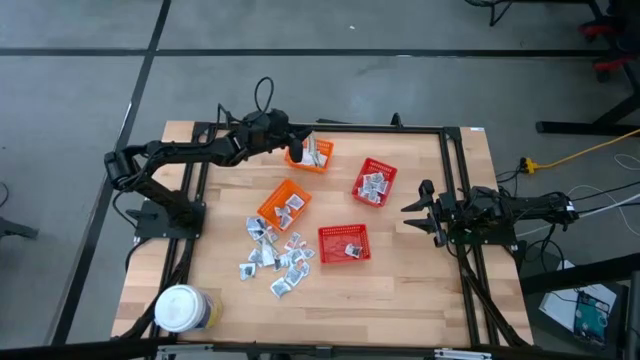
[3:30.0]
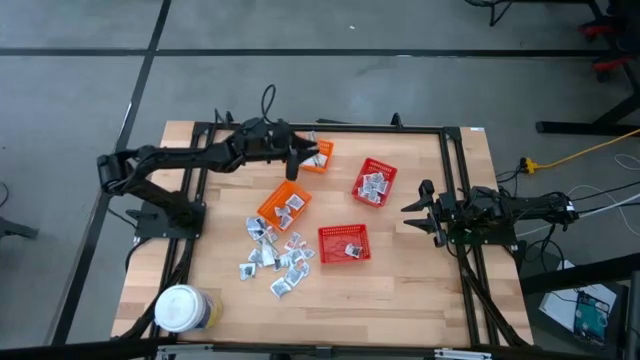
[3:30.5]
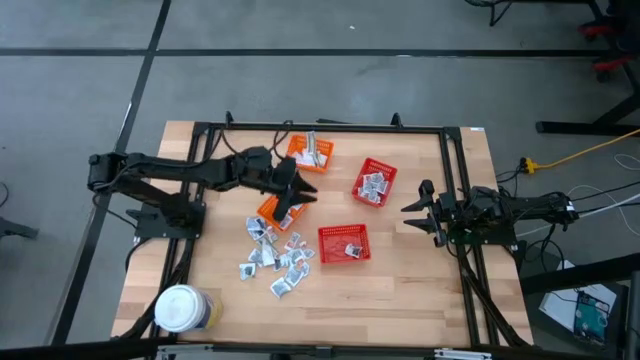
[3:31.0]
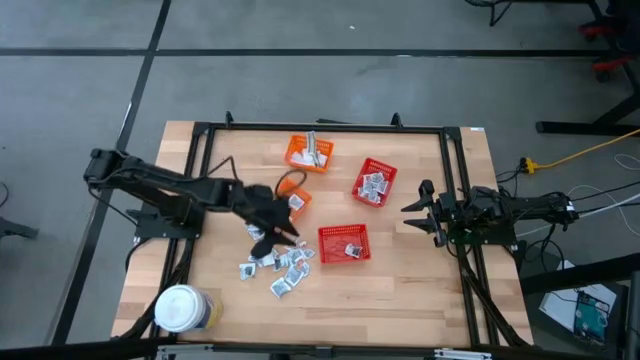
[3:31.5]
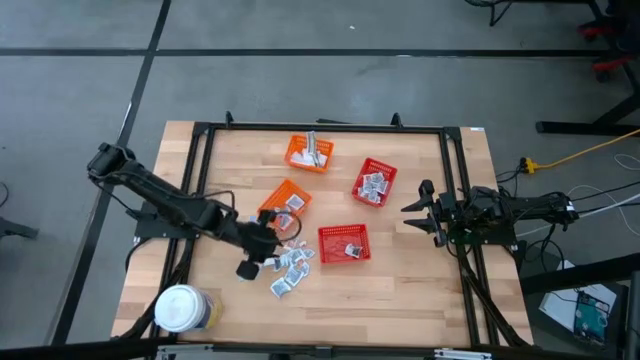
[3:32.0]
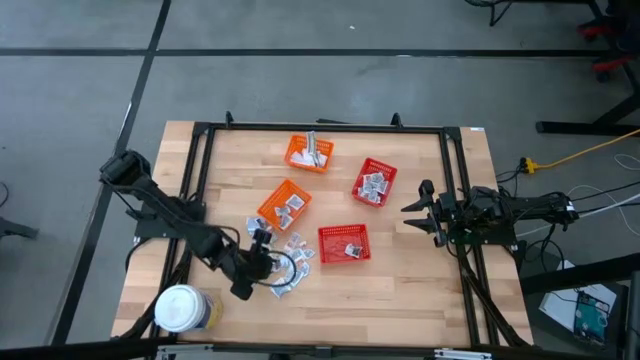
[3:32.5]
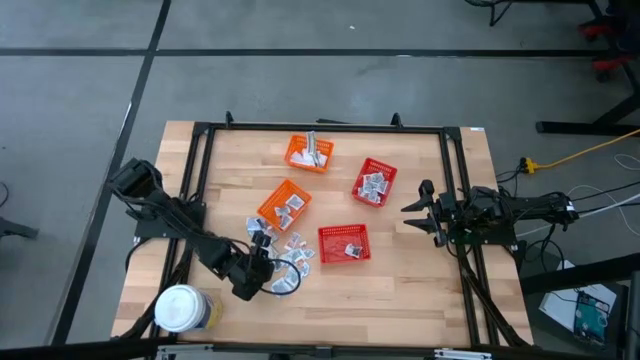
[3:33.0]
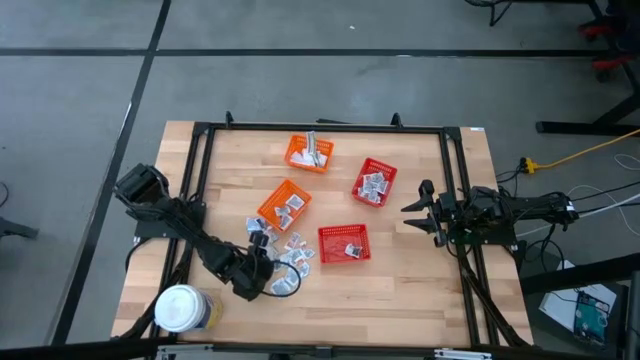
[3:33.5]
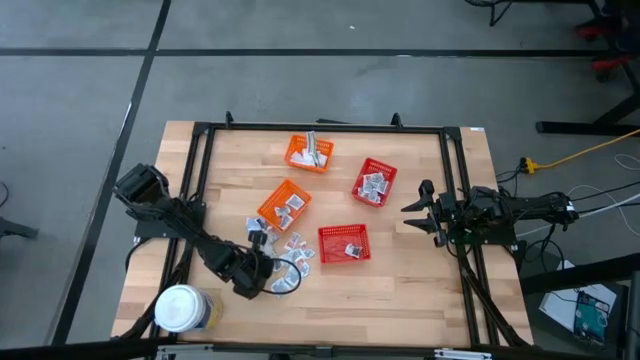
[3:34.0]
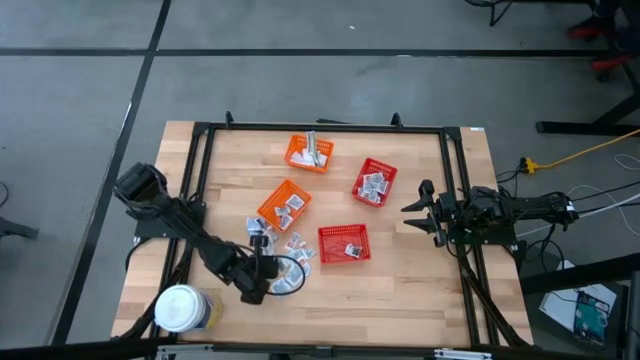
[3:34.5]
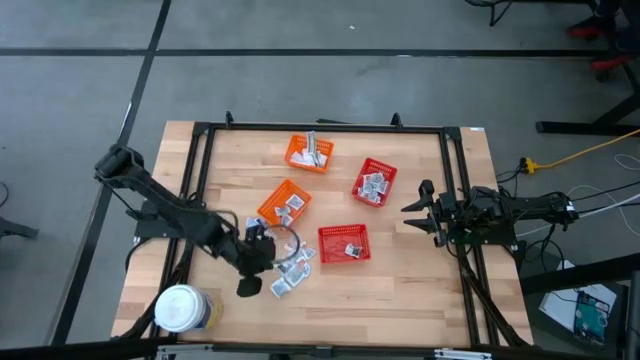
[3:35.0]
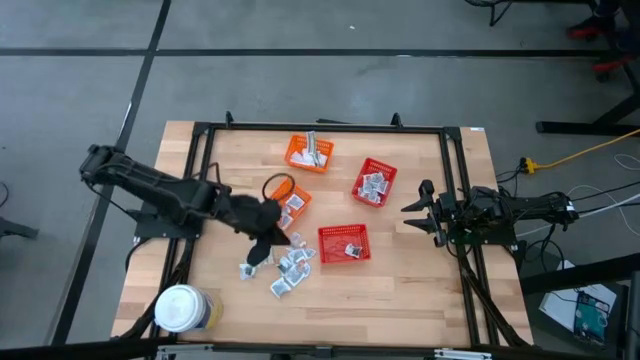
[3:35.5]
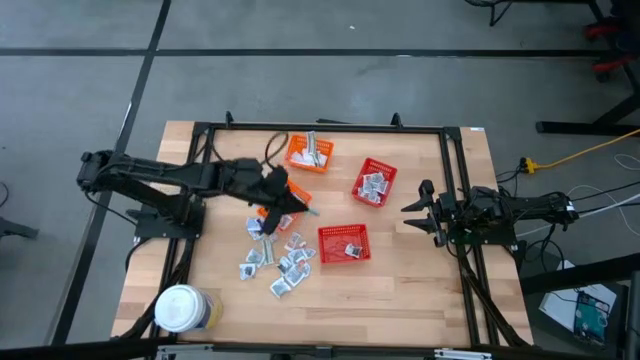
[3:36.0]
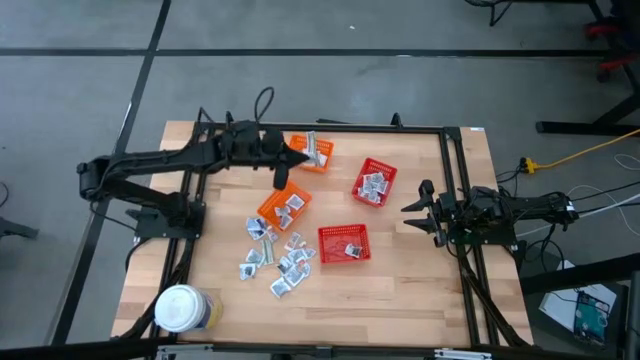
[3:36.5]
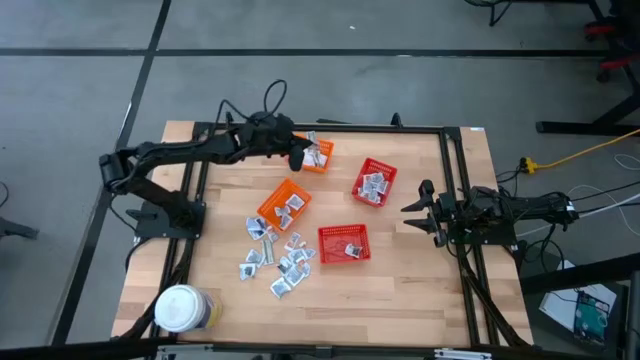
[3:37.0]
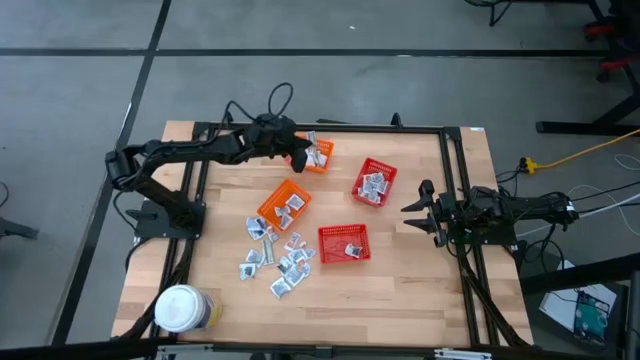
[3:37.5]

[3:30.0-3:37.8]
Task: Pick & Place First Aid Supplies
Put the green bandage pack into the top orange bin

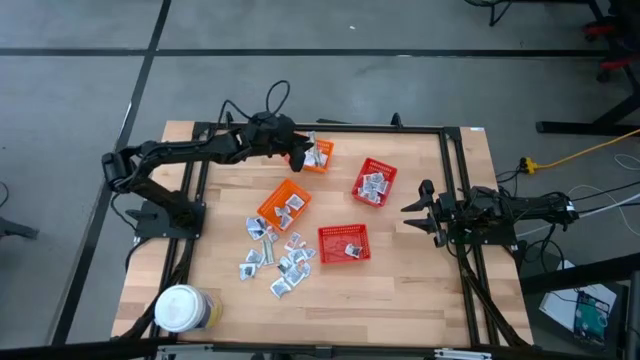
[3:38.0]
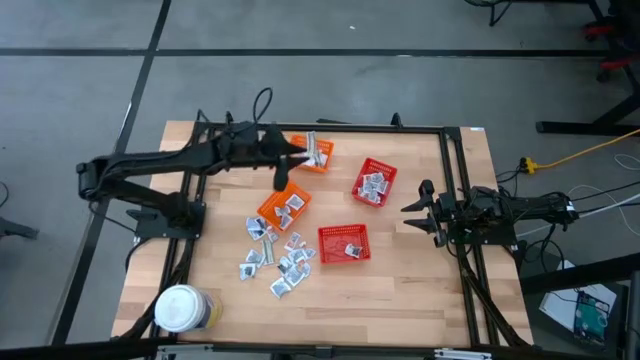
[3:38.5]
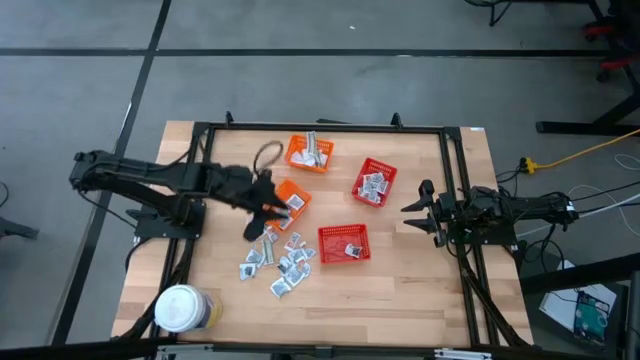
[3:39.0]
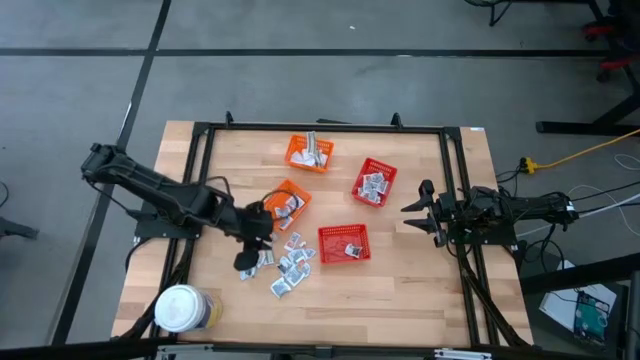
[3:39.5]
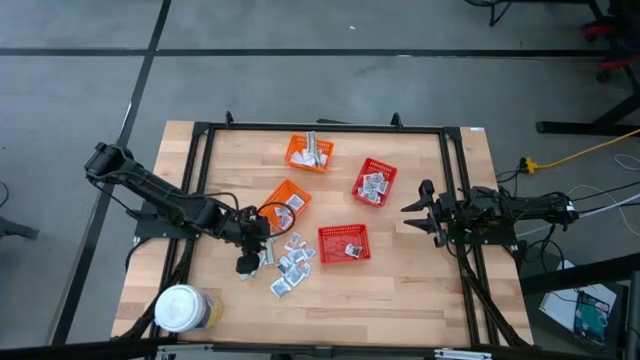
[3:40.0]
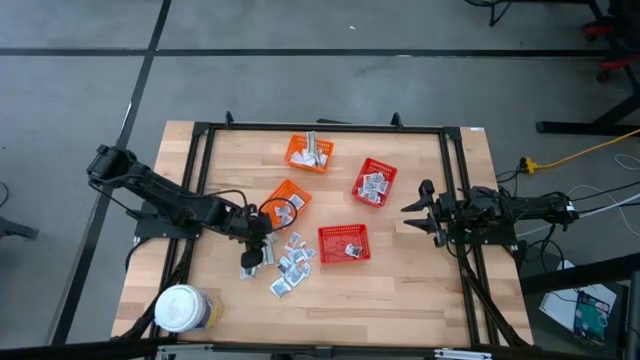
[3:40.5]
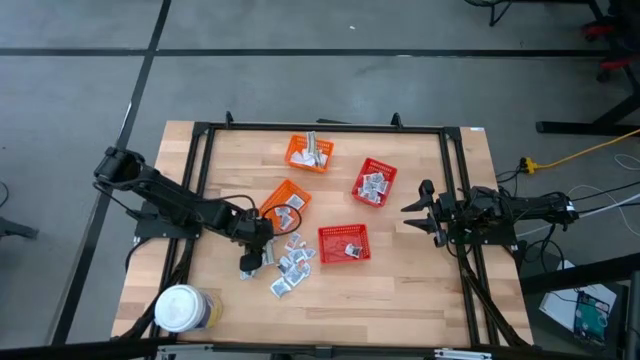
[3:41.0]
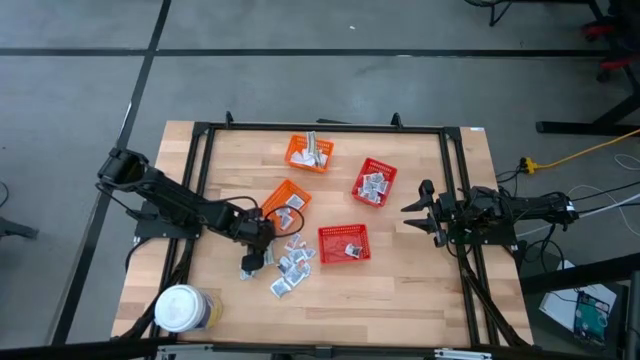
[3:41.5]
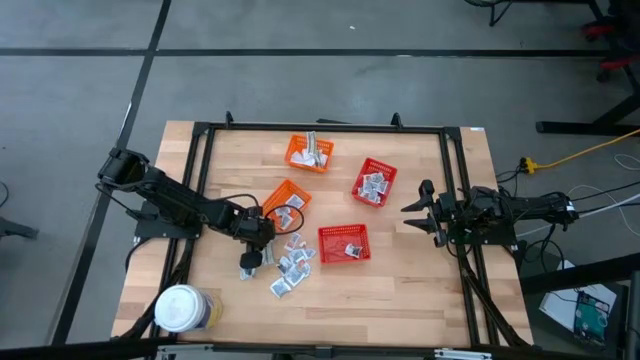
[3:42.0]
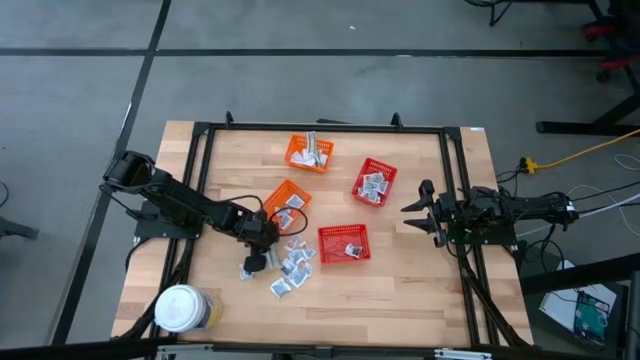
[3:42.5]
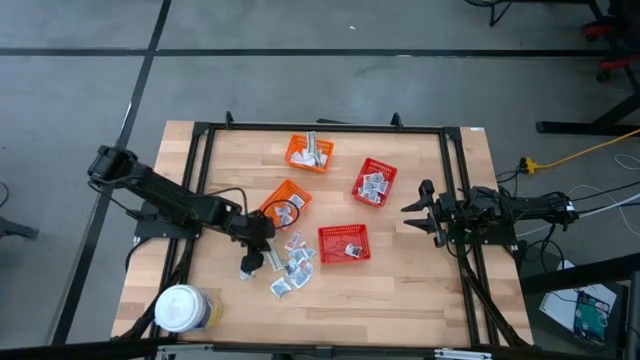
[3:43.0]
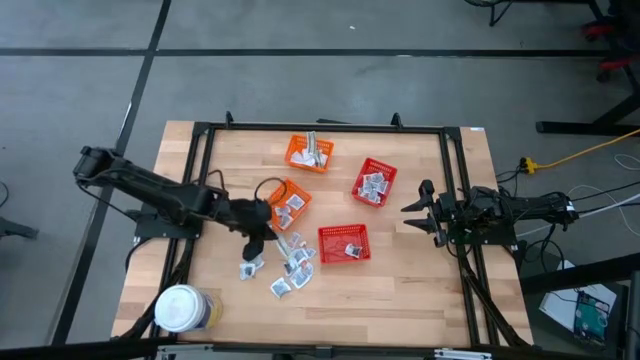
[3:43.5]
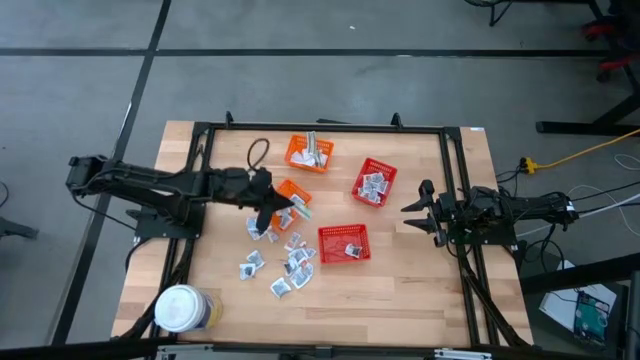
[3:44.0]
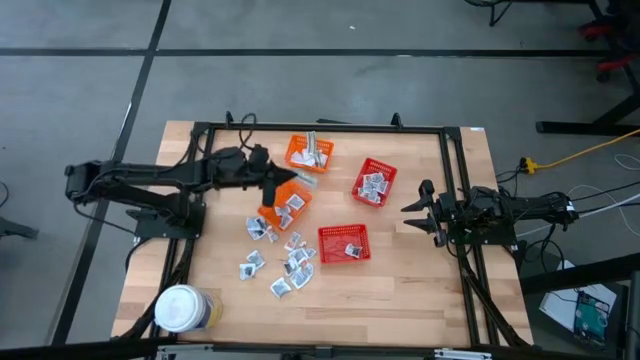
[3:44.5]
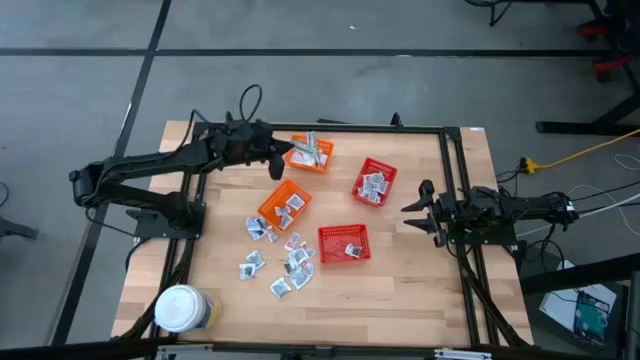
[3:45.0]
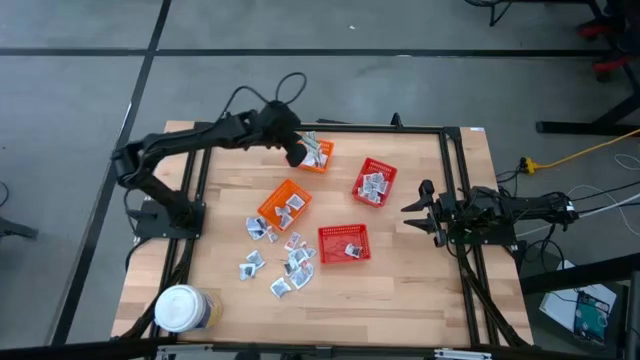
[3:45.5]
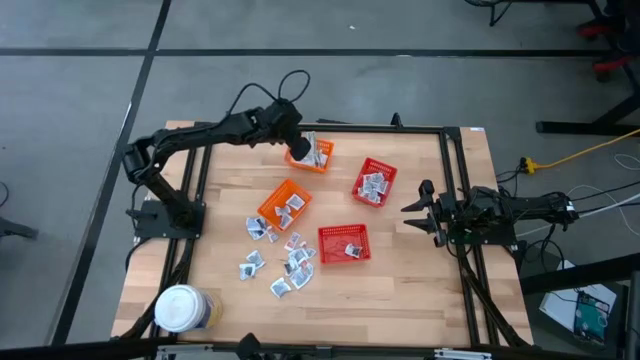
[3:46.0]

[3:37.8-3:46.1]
Put the green bandage pack into the top orange bin

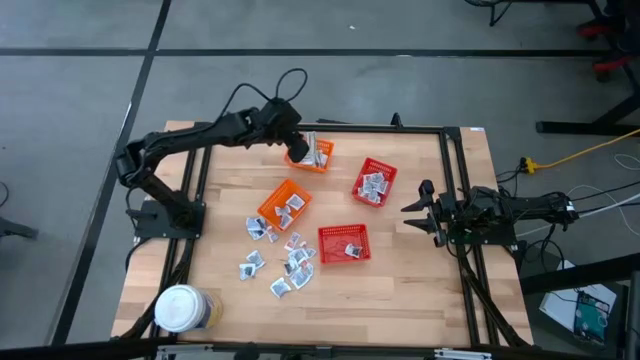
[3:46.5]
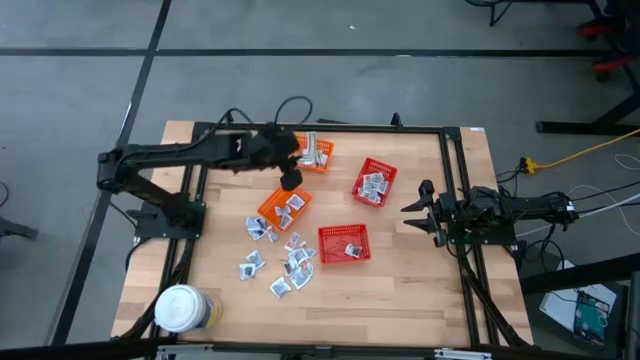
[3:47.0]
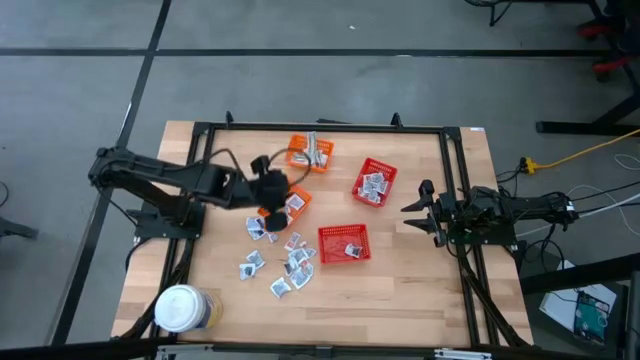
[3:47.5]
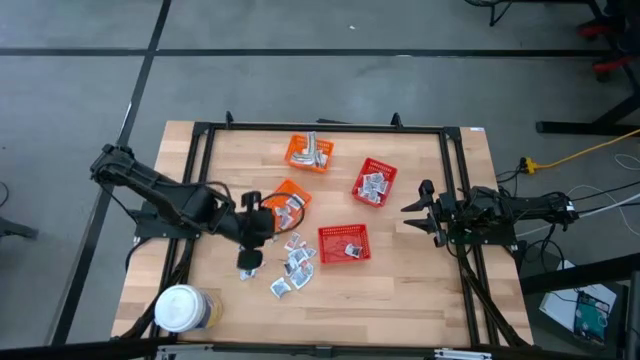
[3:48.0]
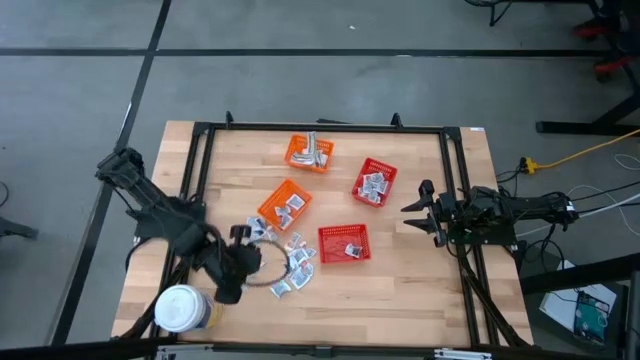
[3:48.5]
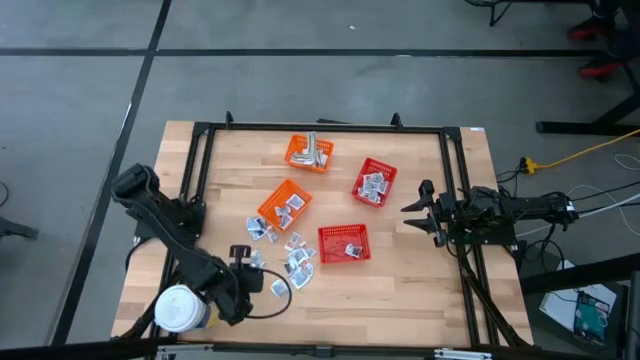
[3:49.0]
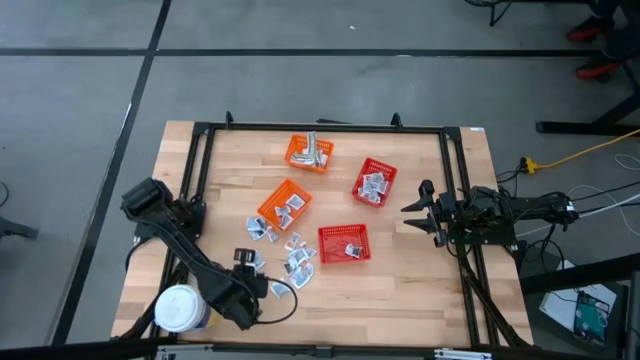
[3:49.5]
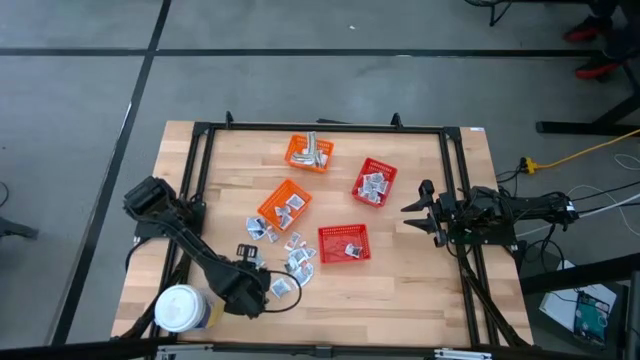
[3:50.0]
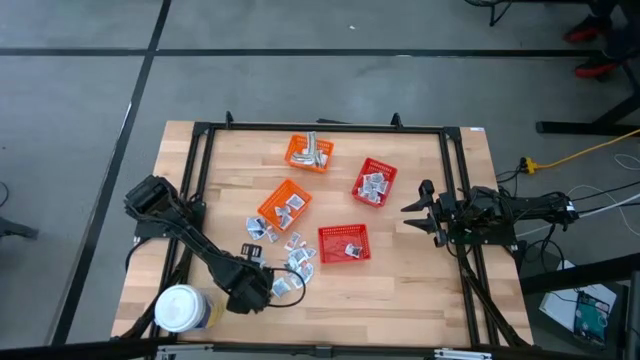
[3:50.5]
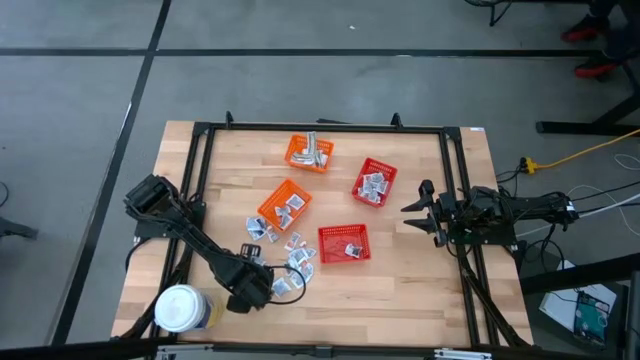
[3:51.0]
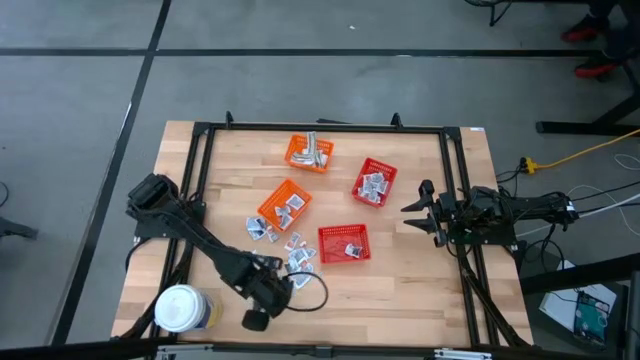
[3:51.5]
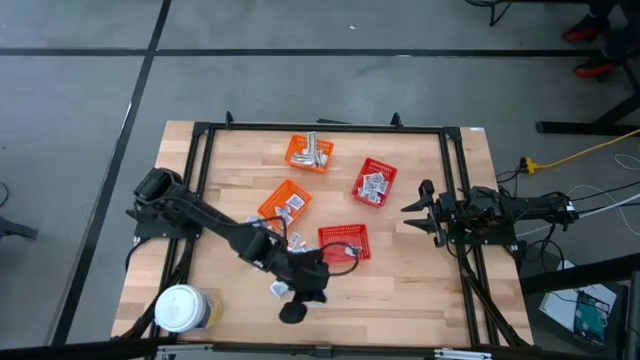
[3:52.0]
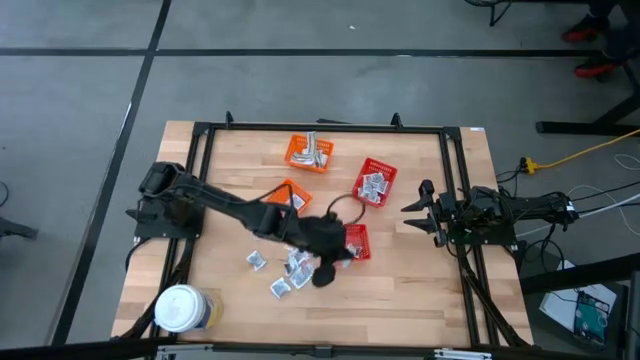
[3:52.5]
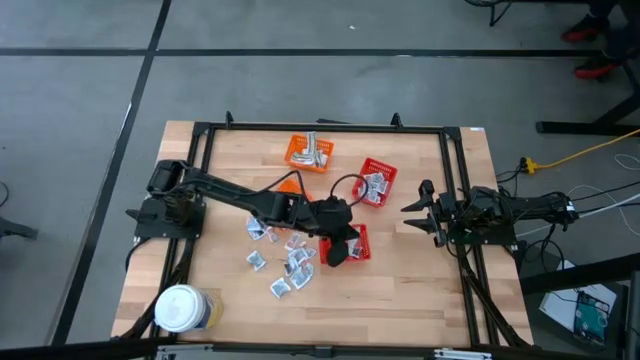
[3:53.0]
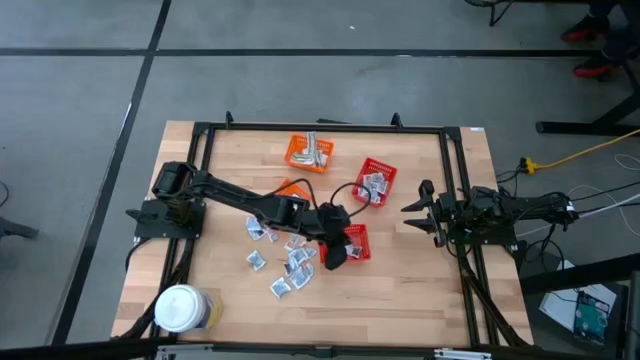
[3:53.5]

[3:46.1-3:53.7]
Put the gray towelette pack into the bottom red bin
